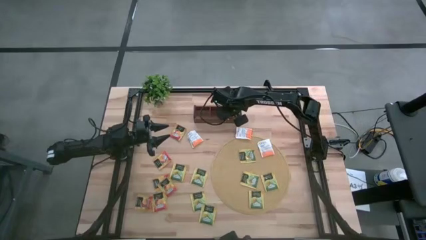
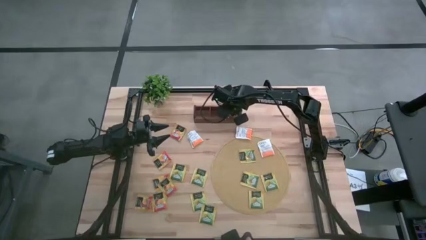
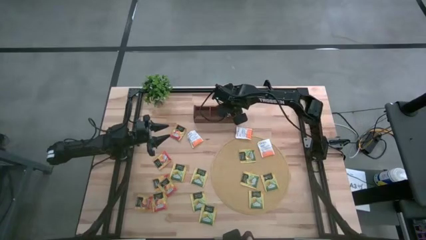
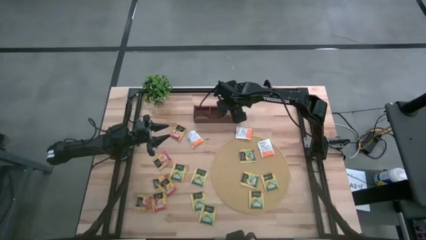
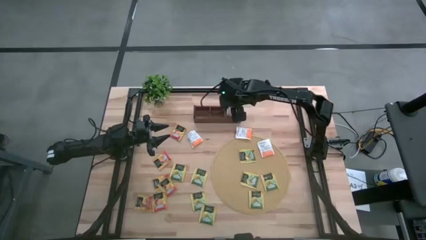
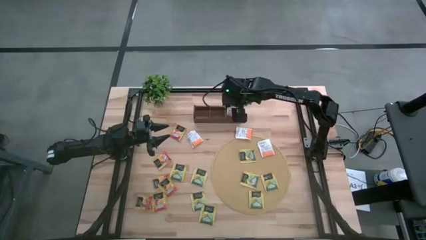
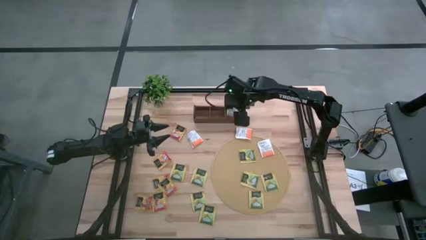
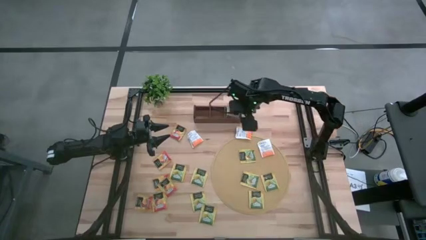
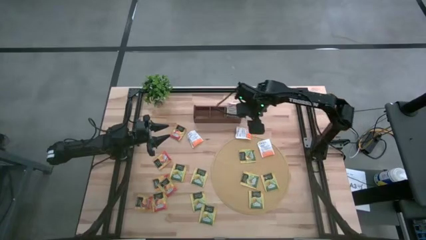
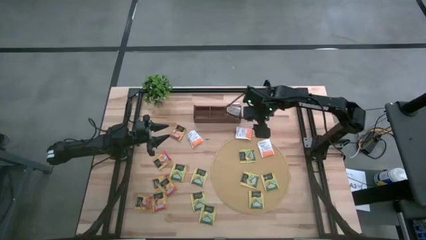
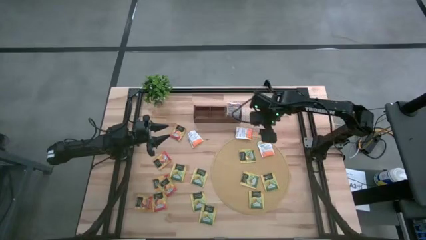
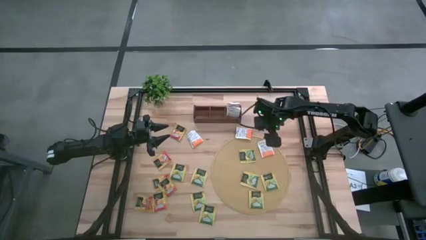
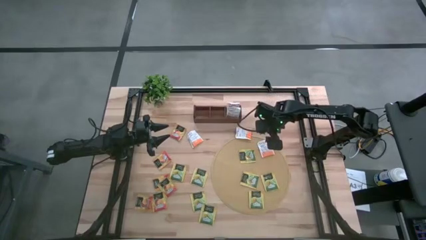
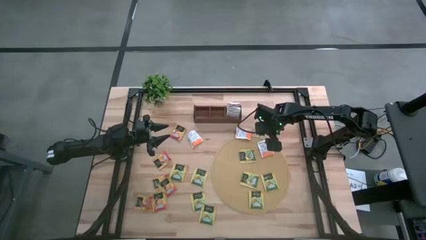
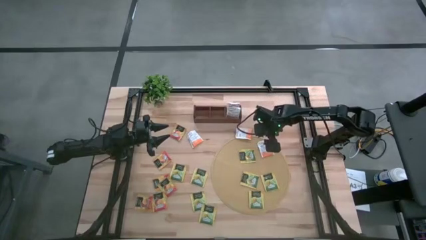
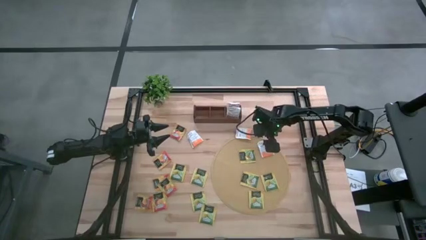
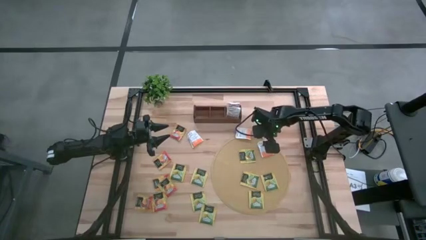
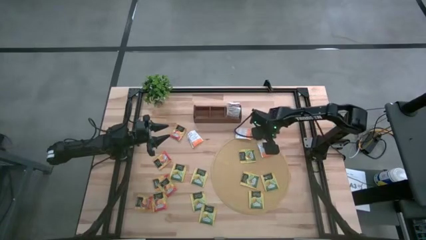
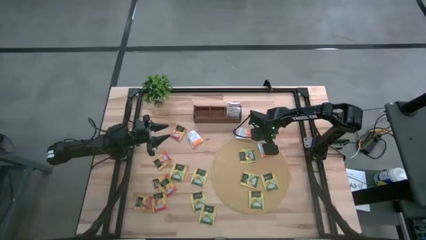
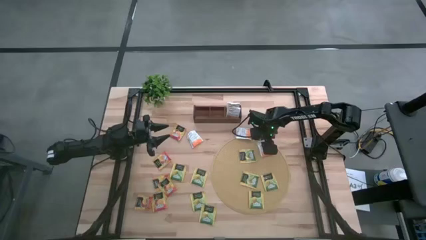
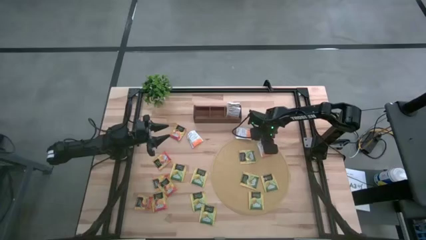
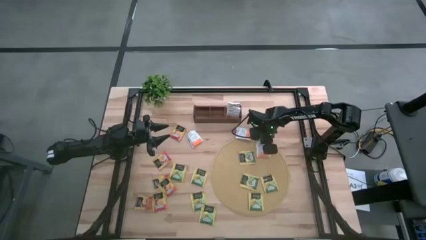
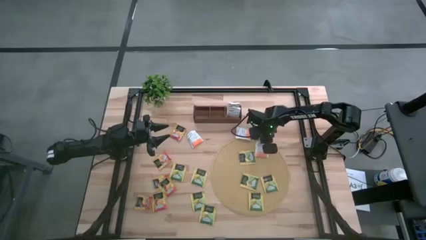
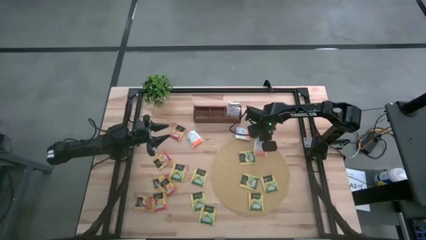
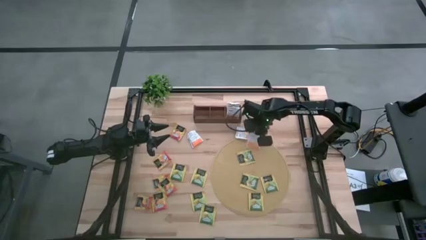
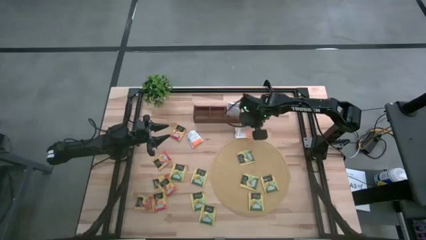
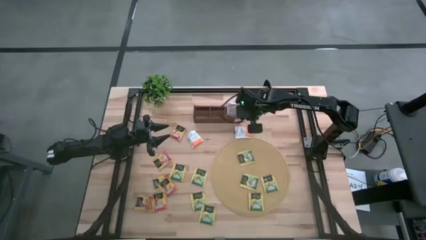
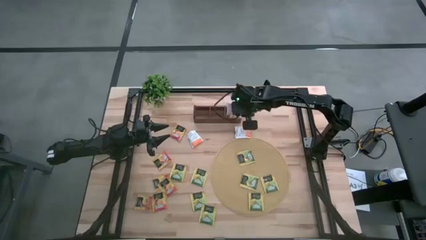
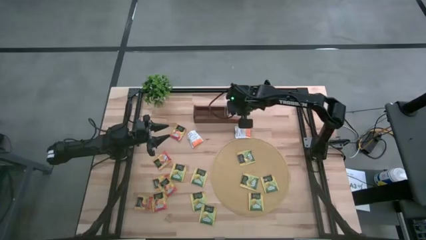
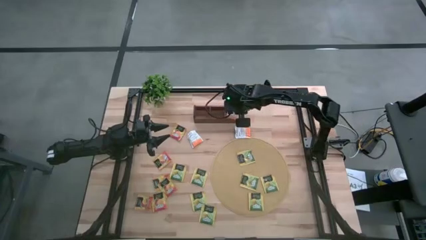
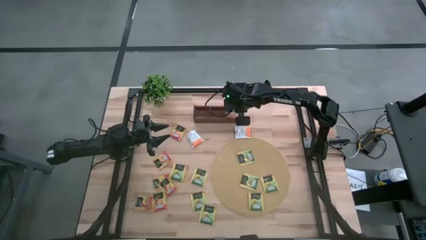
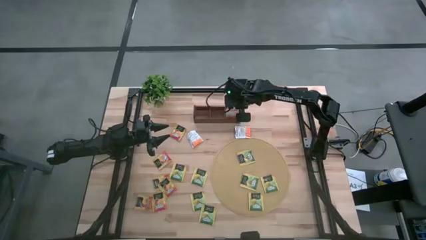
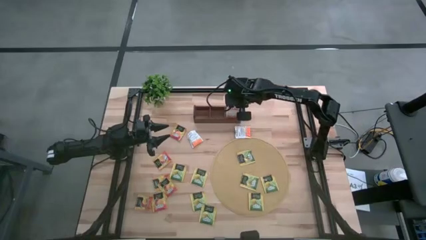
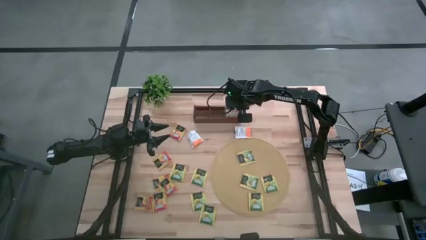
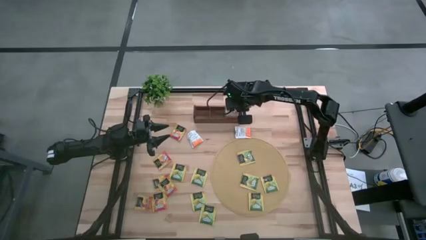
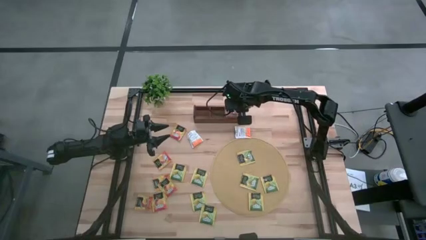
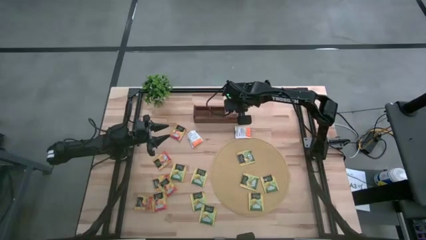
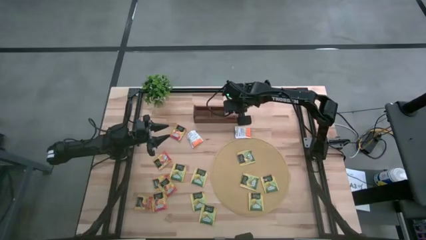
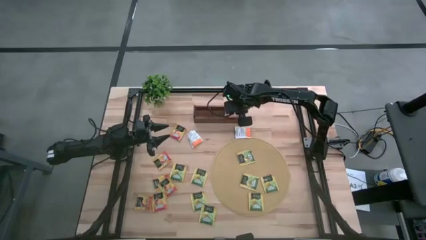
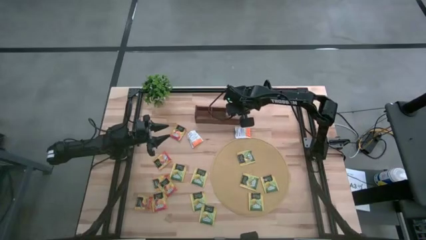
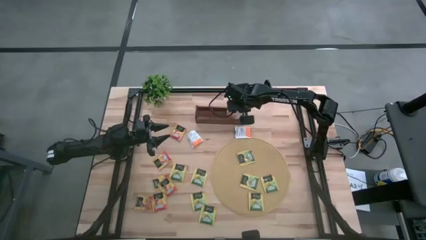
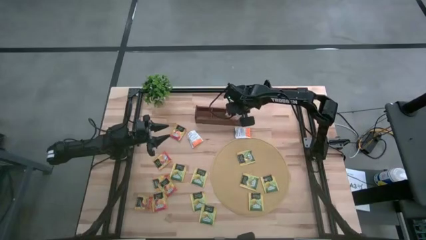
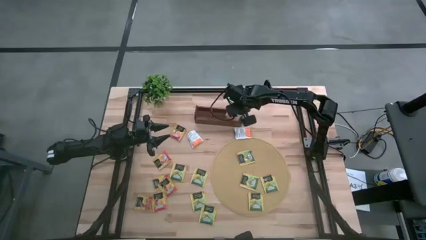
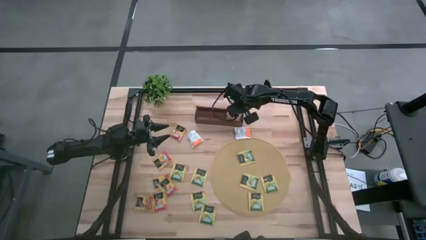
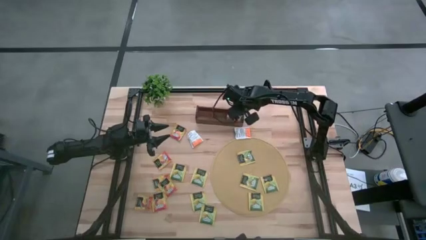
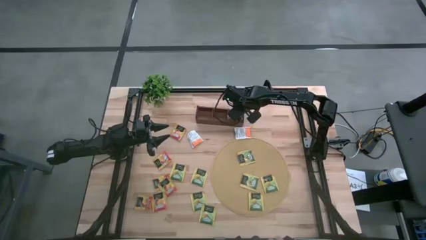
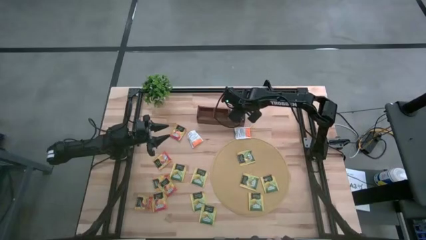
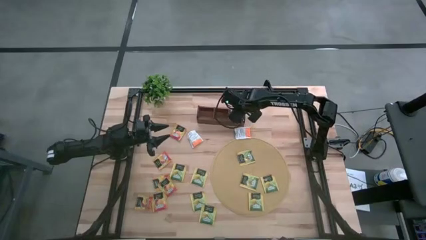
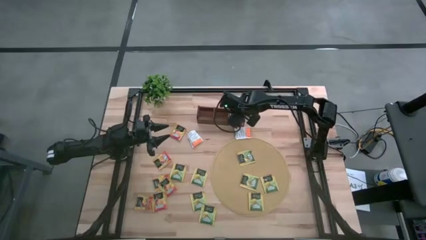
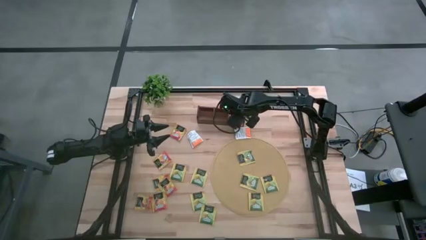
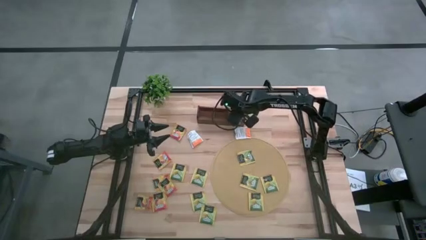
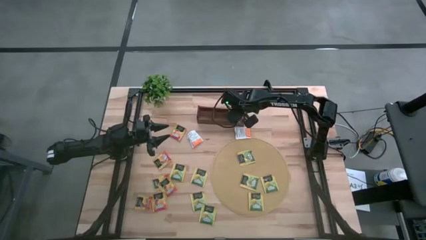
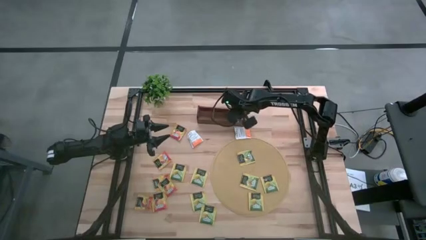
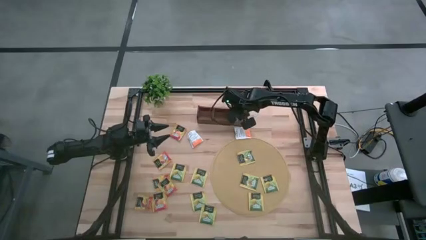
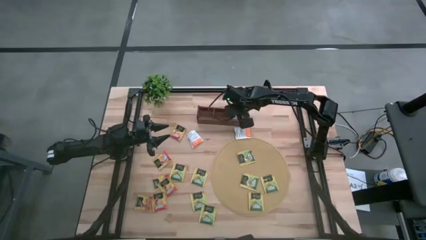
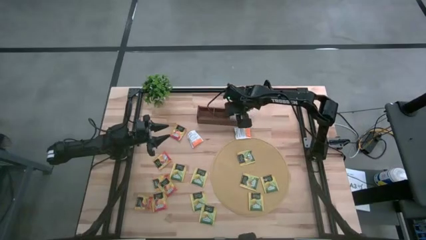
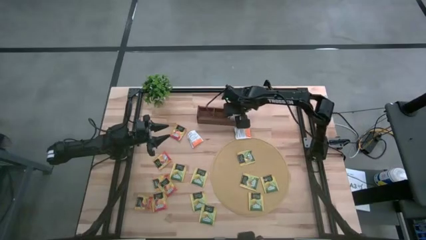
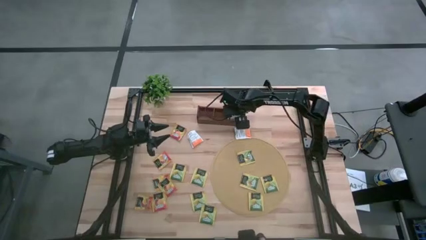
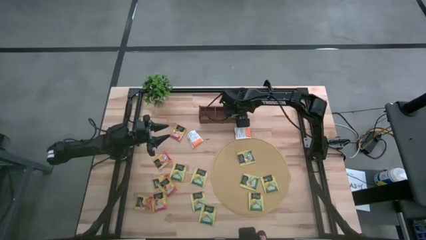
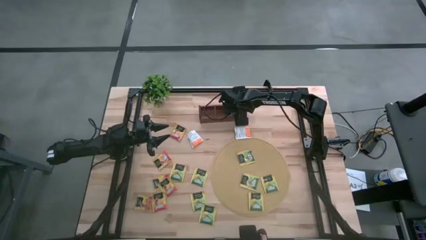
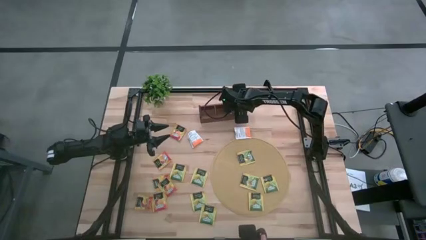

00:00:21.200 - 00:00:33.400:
Task: Pick & Place Tea
Put the white tea bag into the right section of the wooden organizer

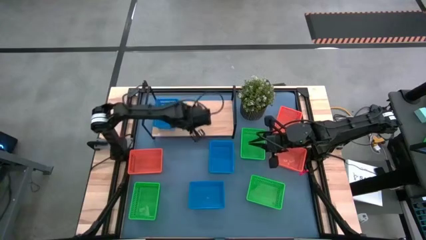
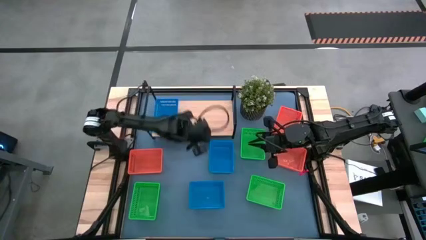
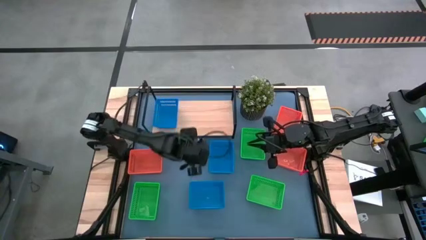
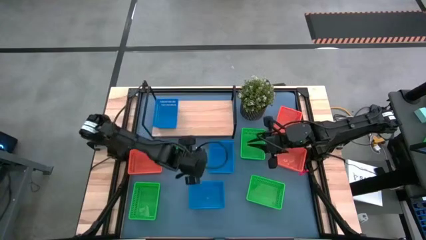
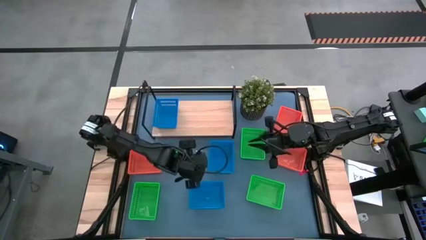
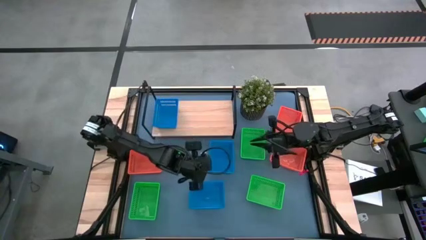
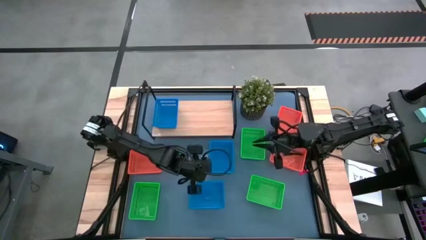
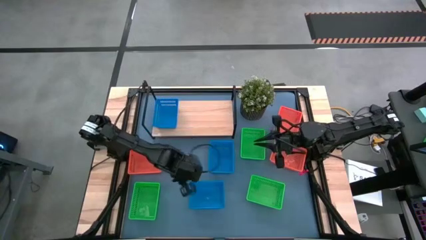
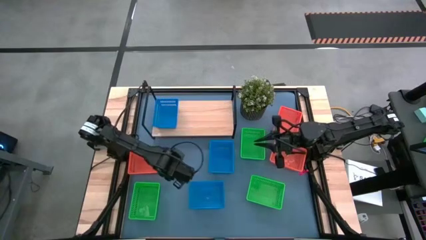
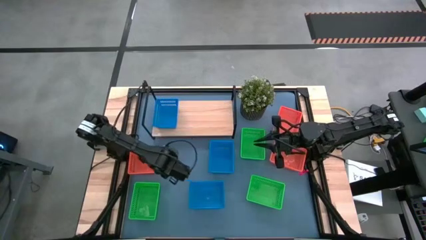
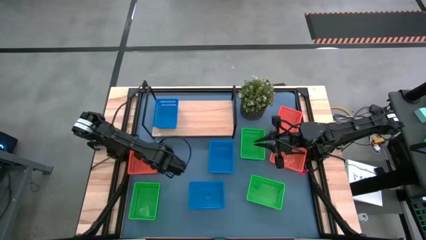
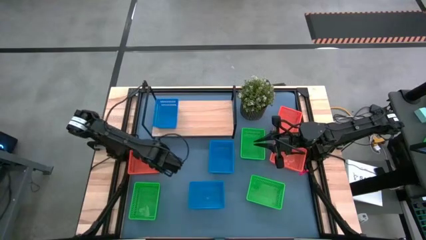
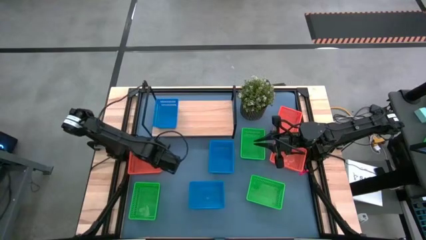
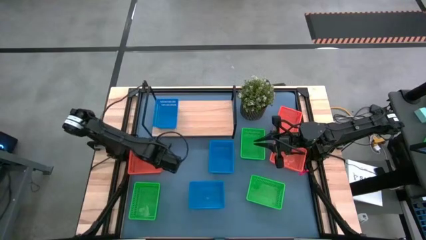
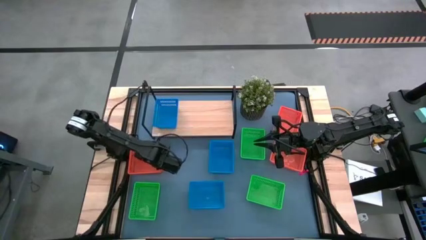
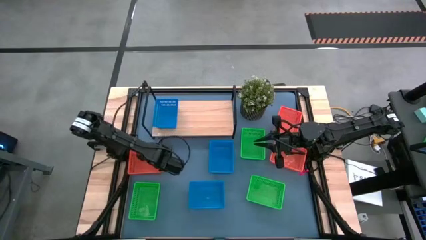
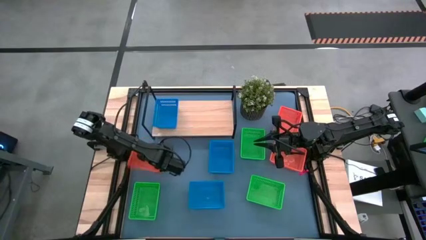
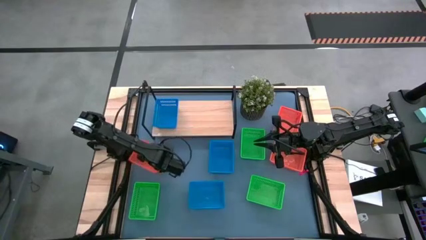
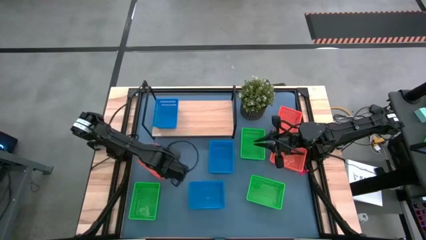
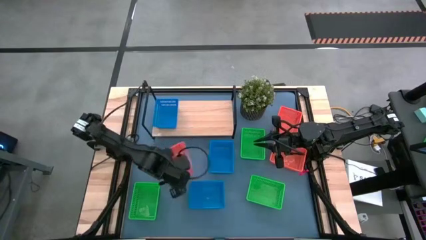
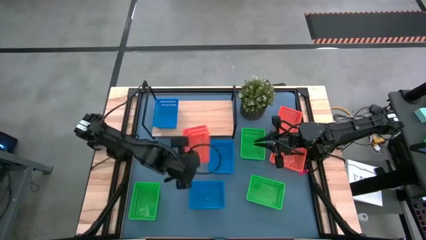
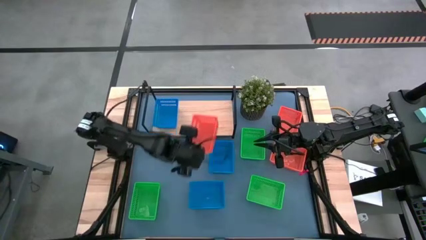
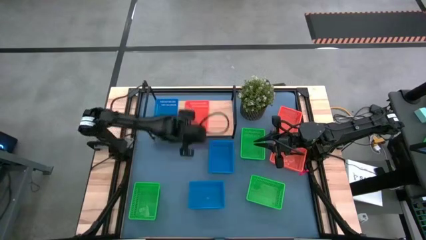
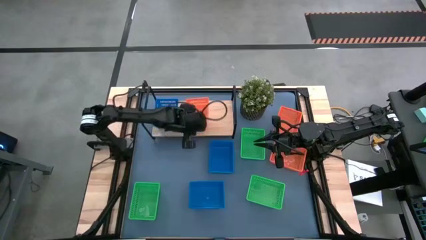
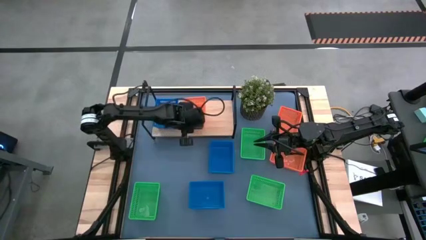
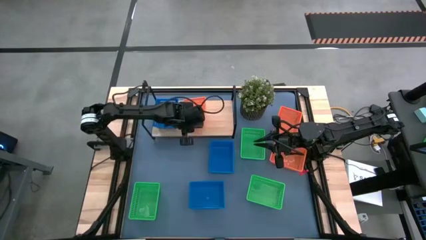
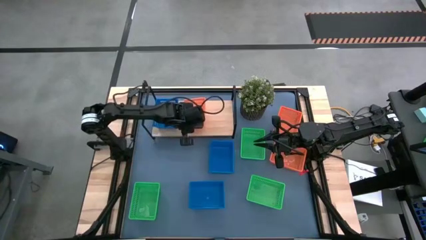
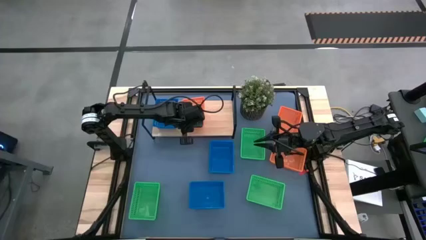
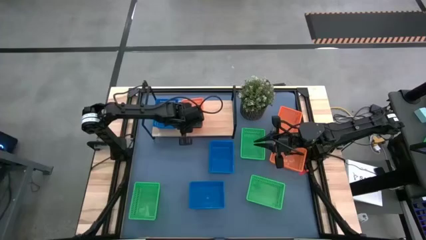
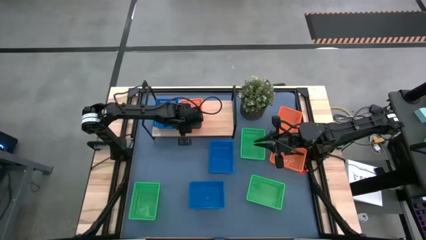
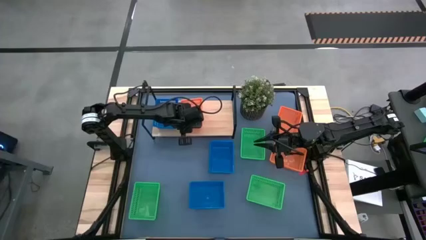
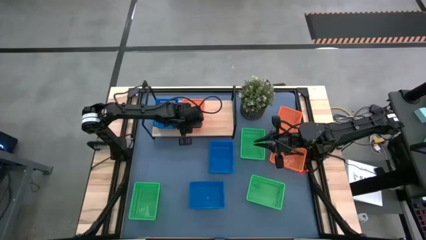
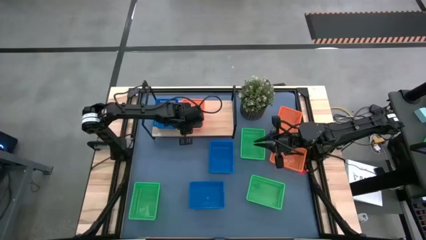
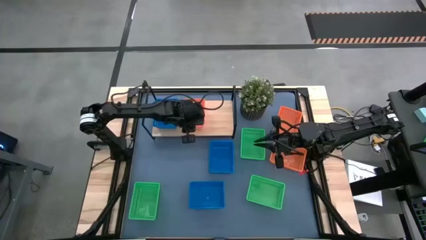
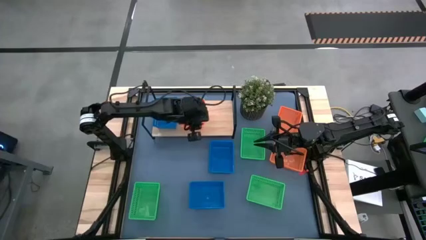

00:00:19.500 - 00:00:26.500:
Task: Stack baskets on shelf by color
Put the left orange bin on the shelf
